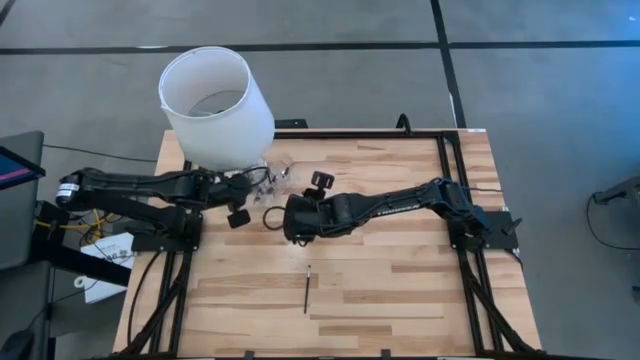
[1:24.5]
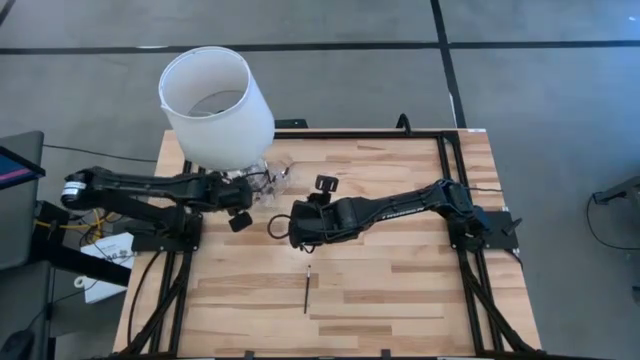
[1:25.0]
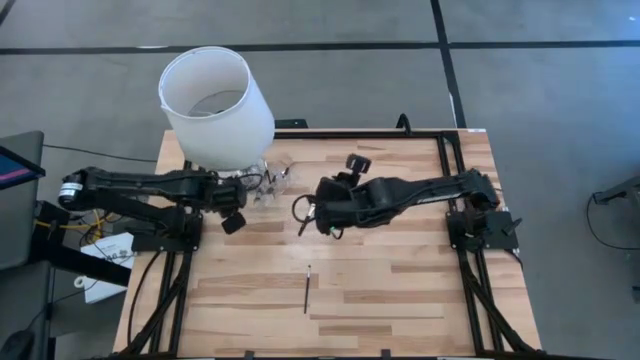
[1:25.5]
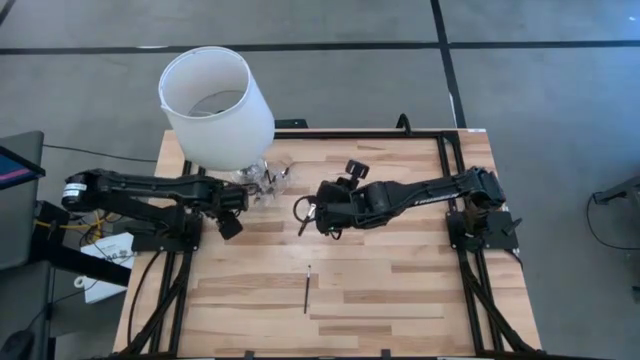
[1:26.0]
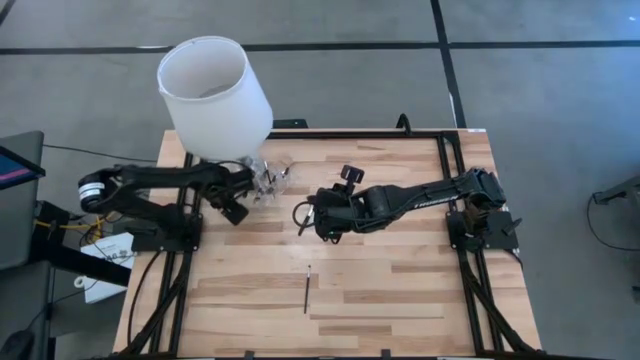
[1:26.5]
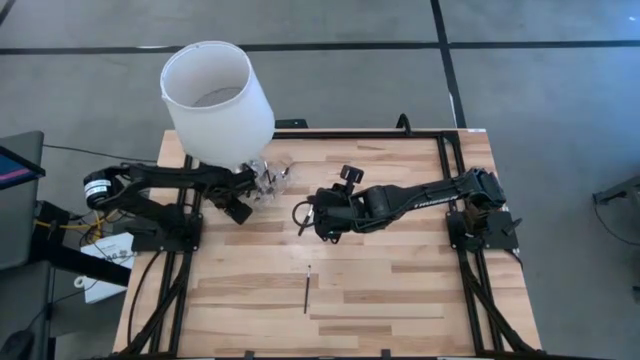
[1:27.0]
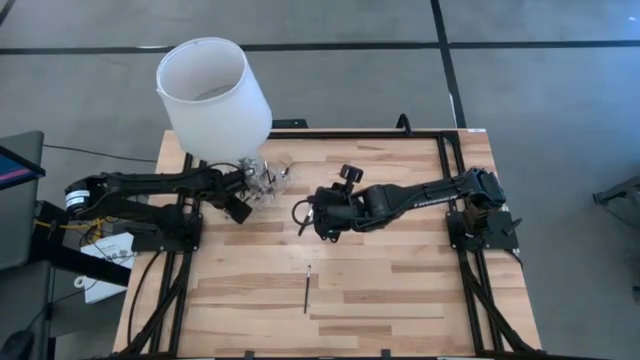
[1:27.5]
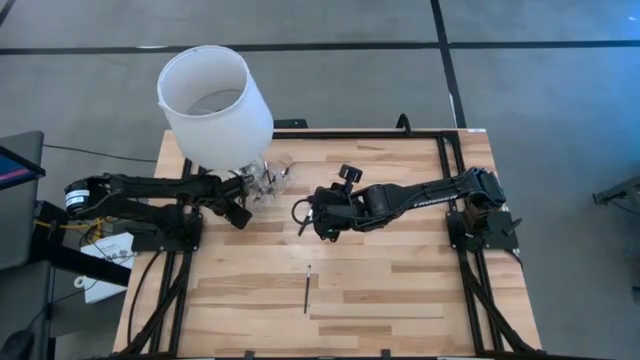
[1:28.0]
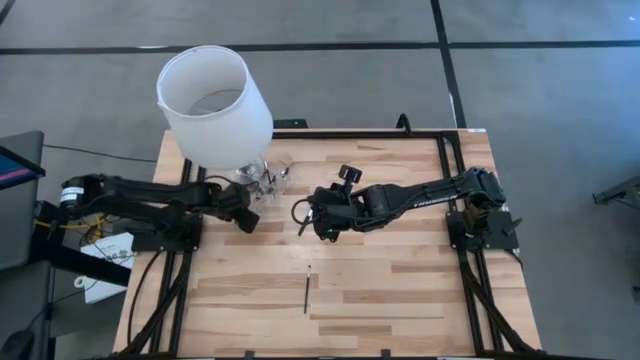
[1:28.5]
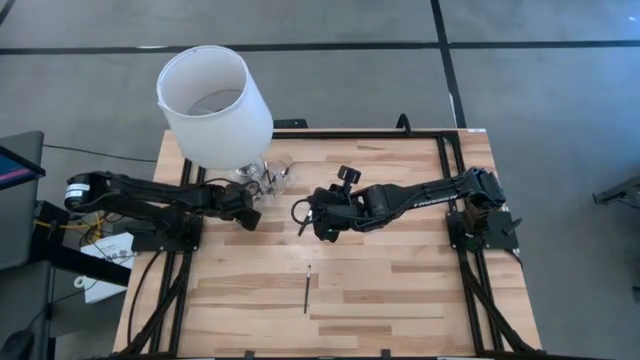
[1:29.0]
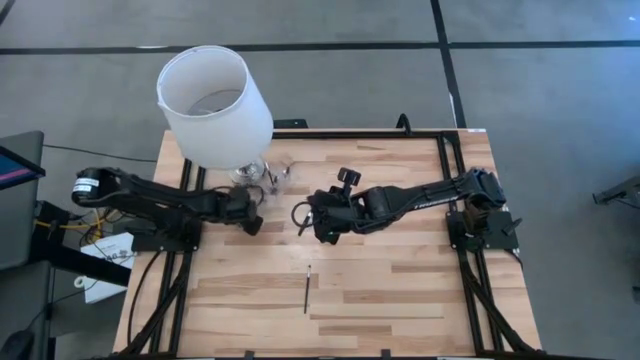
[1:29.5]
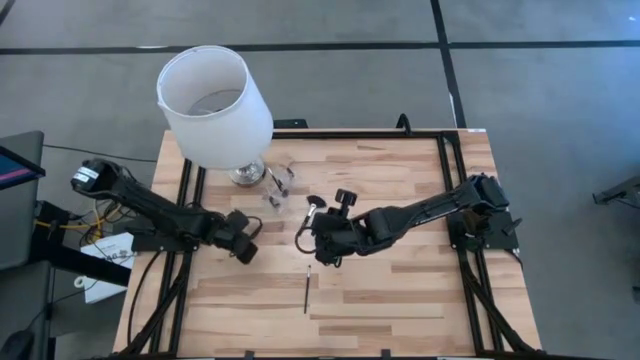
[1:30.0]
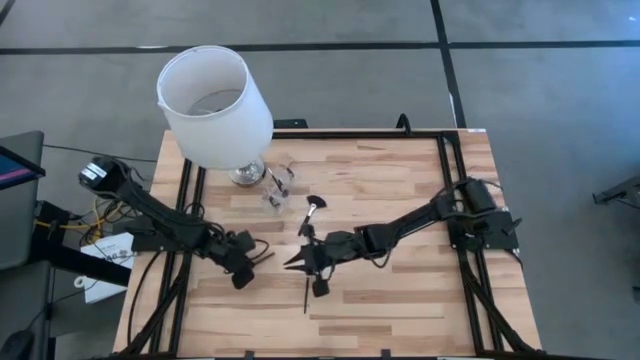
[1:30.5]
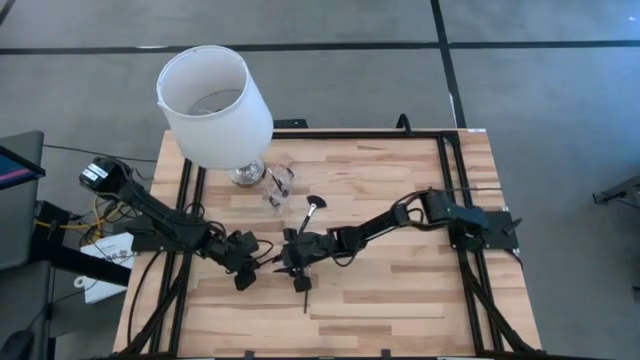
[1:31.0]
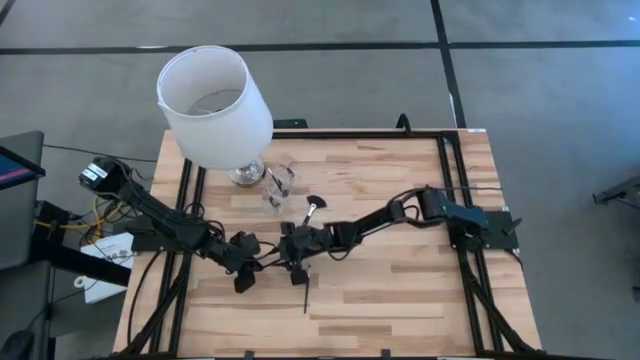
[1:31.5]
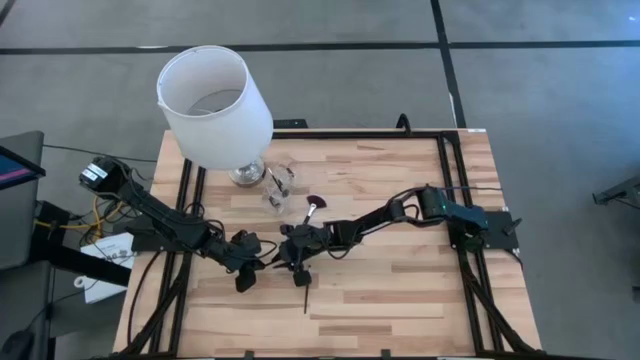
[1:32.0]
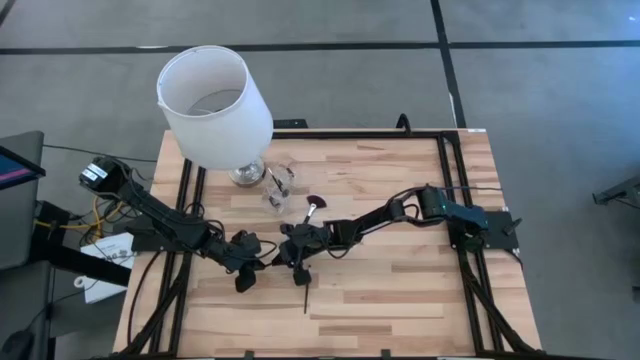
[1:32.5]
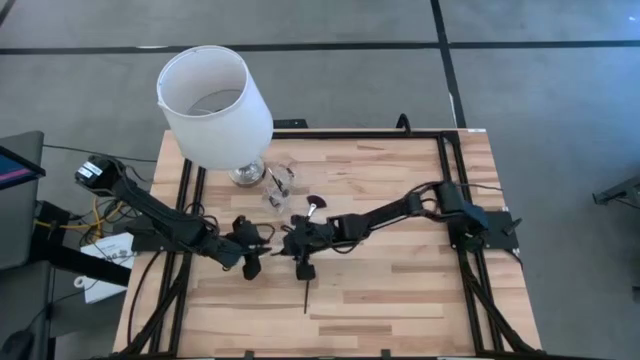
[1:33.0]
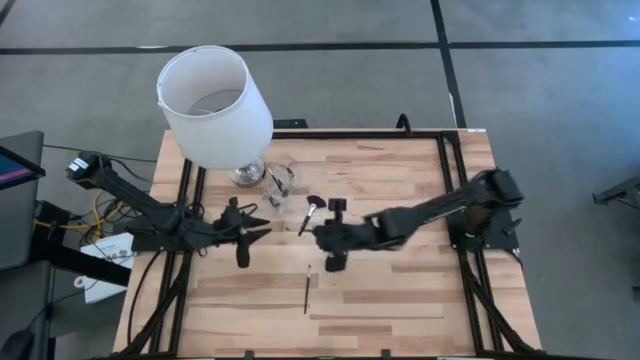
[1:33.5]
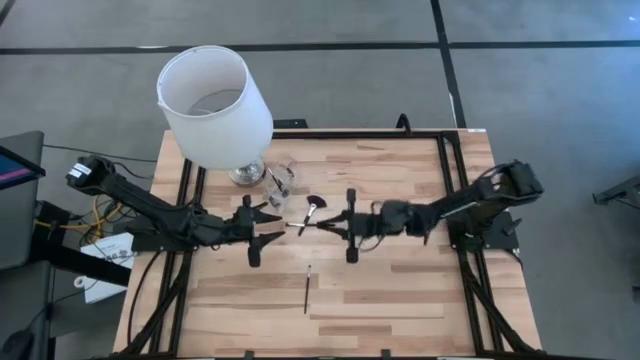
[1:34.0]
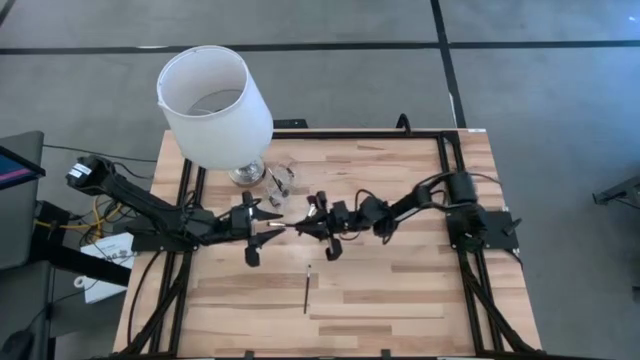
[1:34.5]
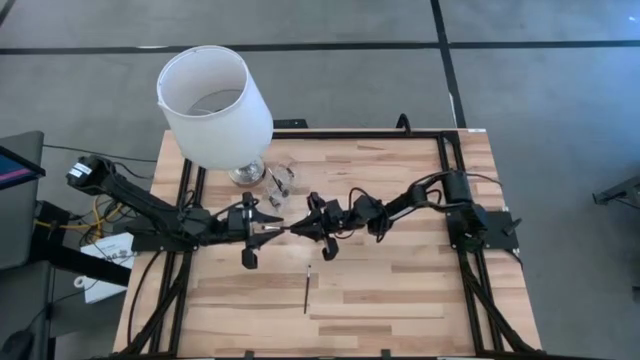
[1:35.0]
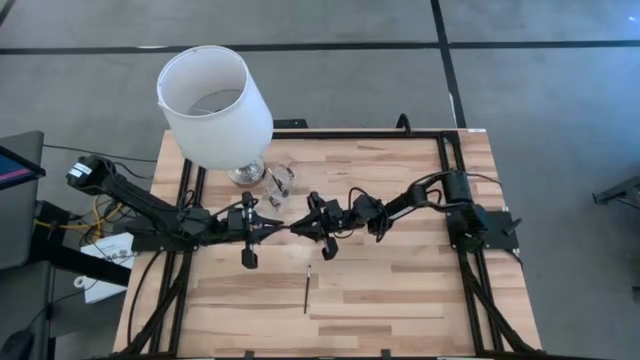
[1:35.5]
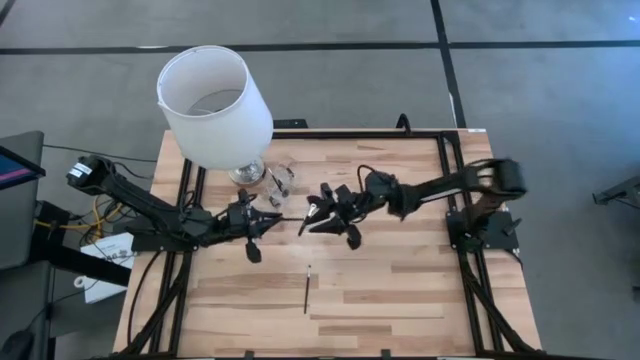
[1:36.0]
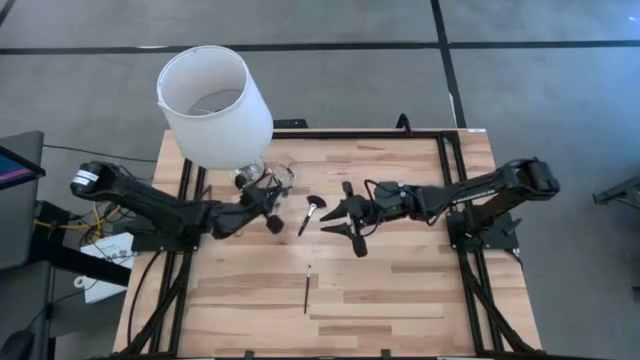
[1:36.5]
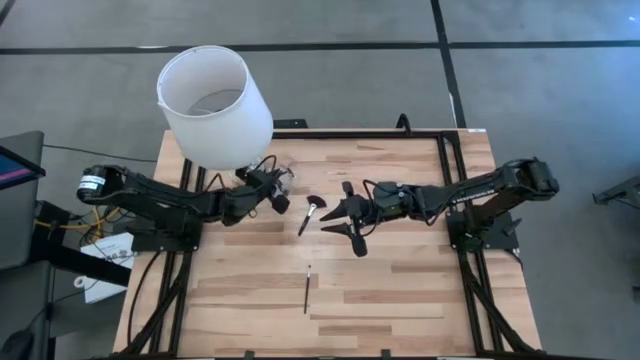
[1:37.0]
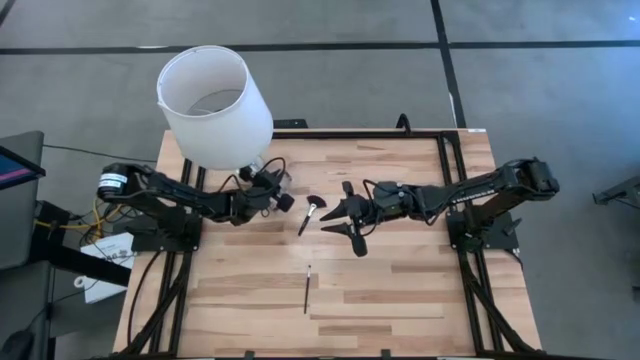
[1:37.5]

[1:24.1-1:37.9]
Task: Put items in baskets/containers
Put the black eyeshadow brush in the transparent organizer

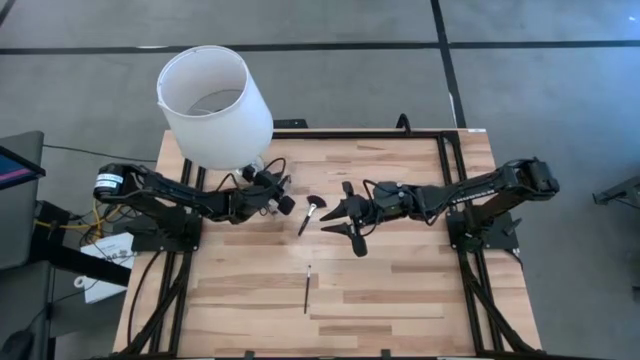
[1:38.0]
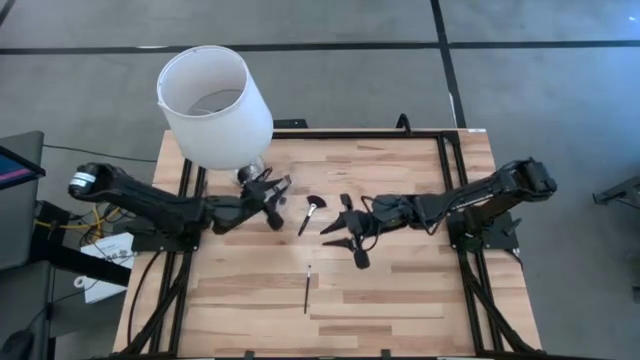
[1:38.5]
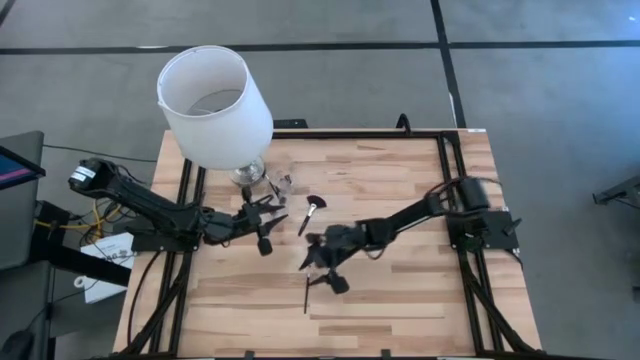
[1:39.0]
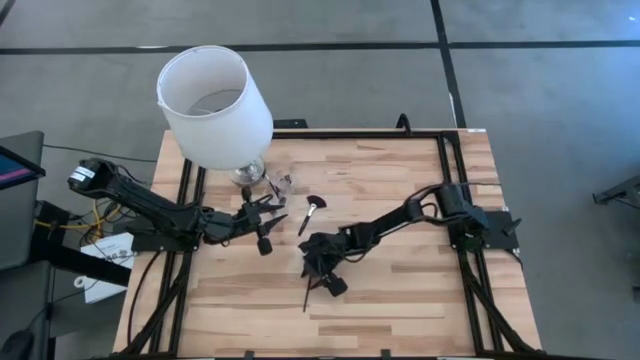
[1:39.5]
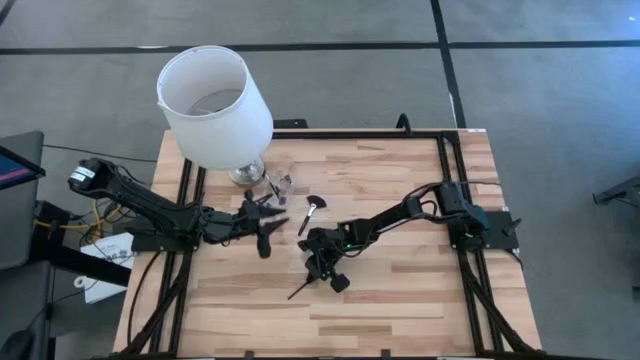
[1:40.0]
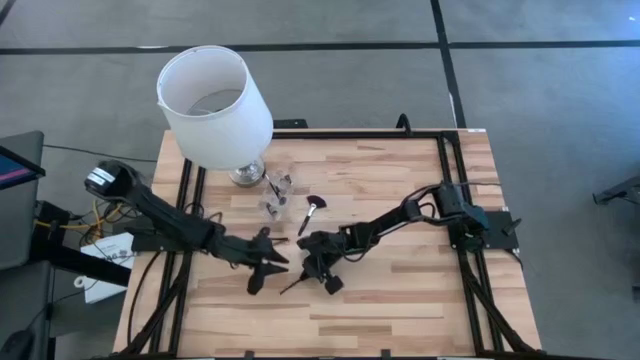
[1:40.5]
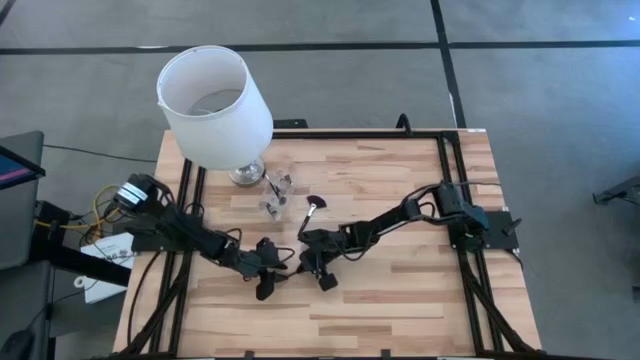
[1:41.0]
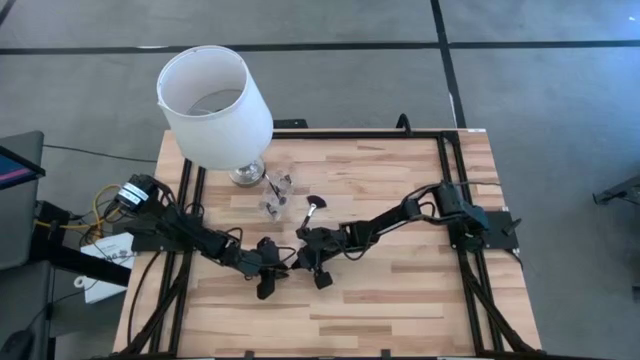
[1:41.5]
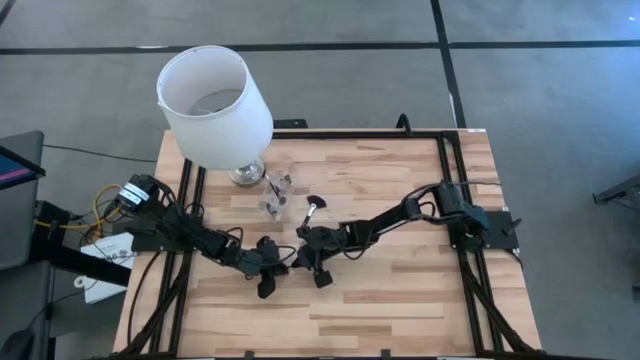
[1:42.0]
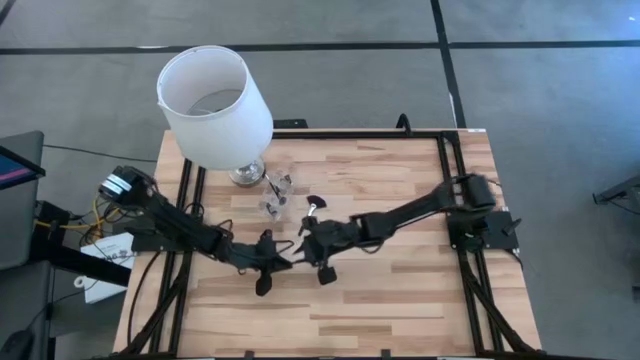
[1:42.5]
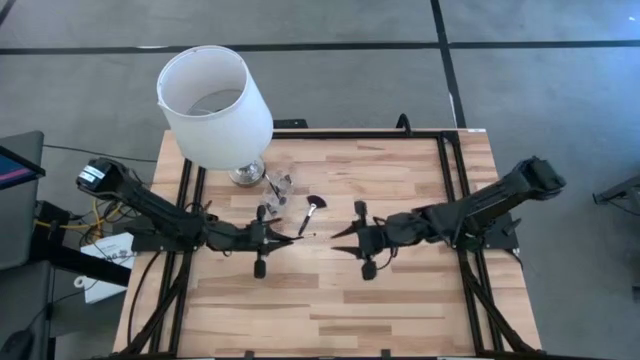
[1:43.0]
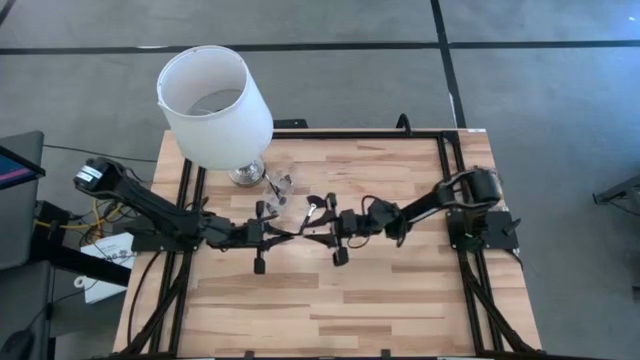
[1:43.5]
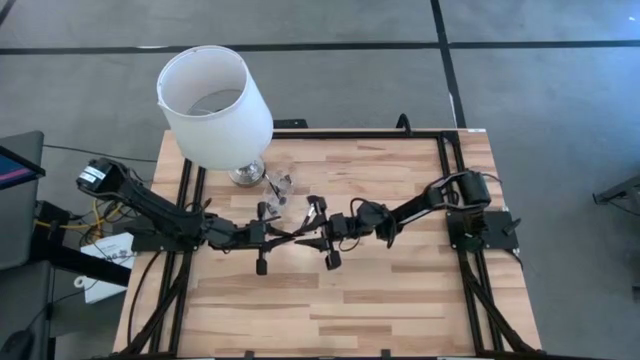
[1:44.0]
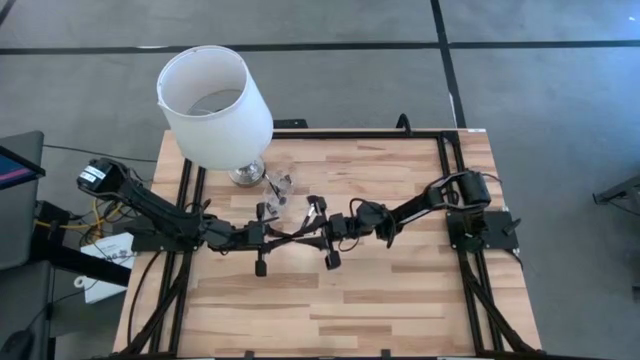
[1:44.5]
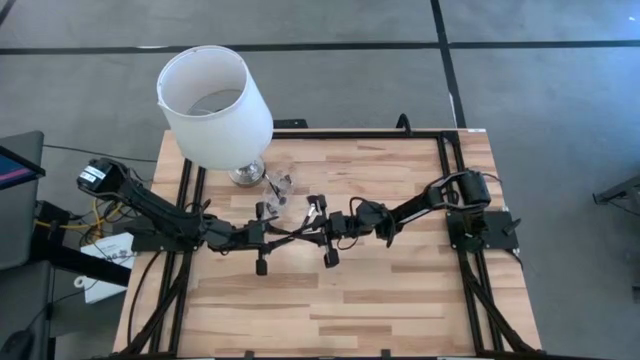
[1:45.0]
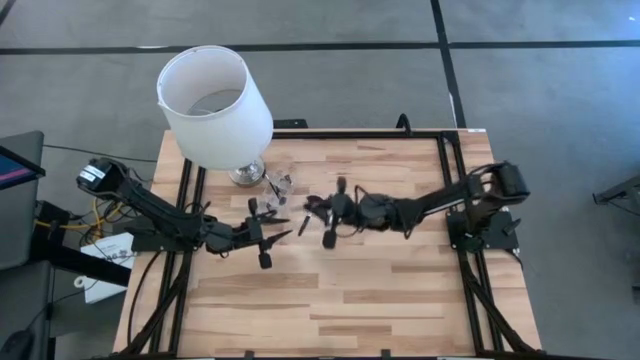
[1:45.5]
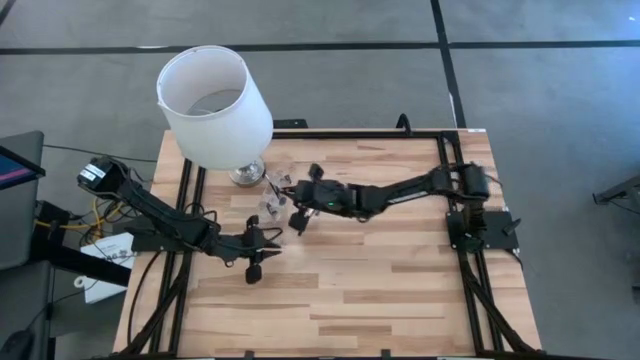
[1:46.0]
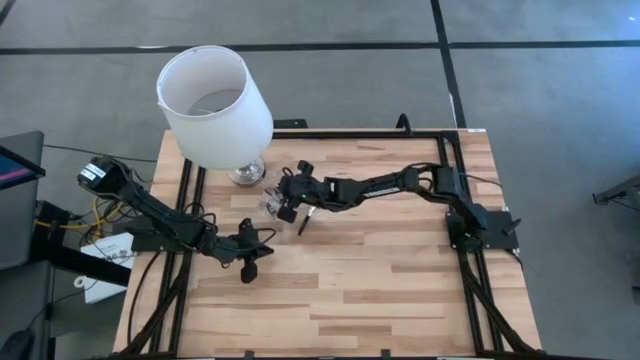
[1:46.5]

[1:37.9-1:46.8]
Put the black eyeshadow brush in the transparent organizer
